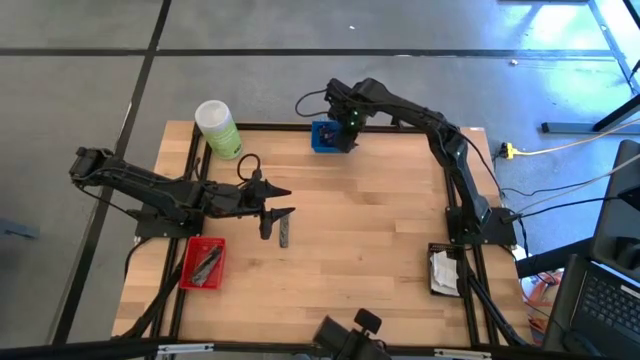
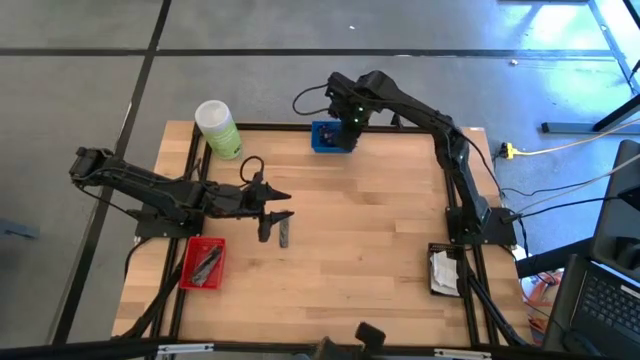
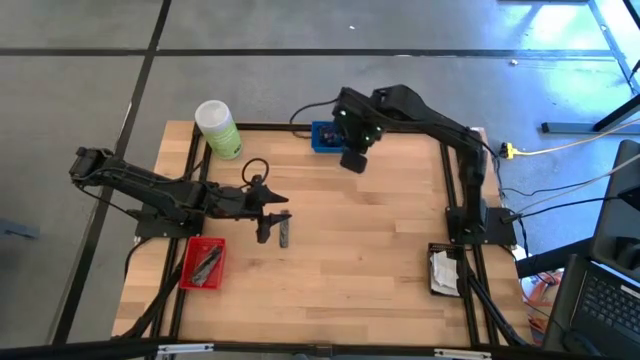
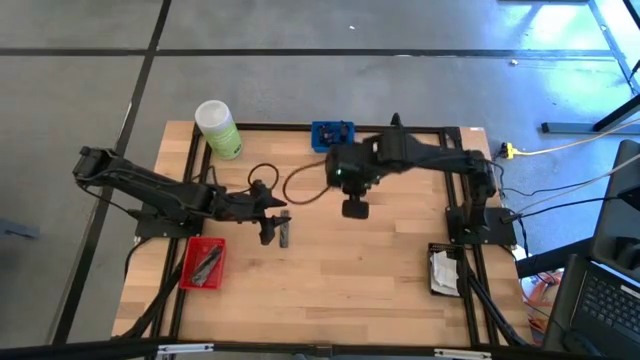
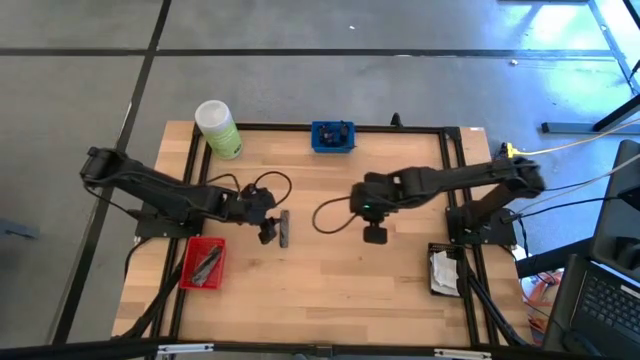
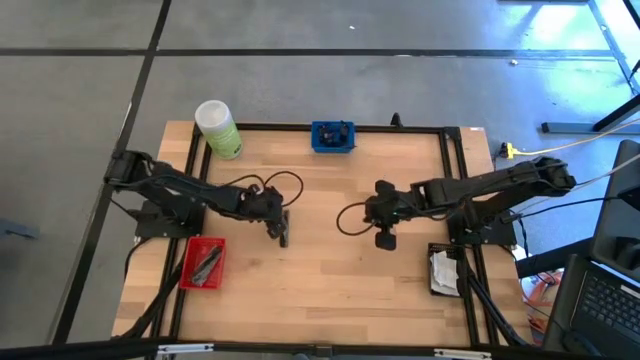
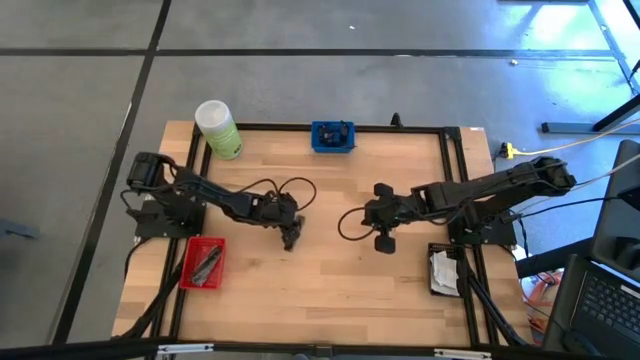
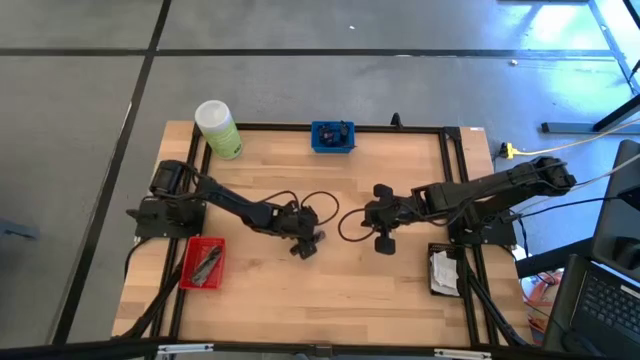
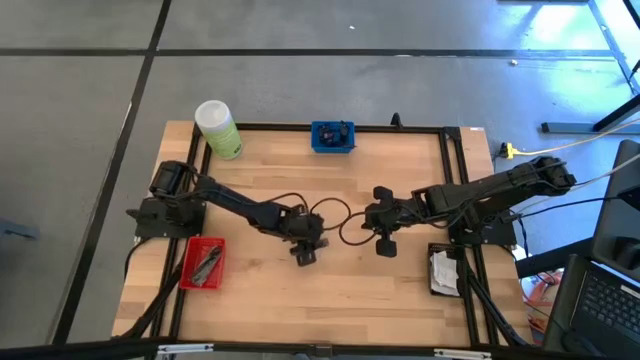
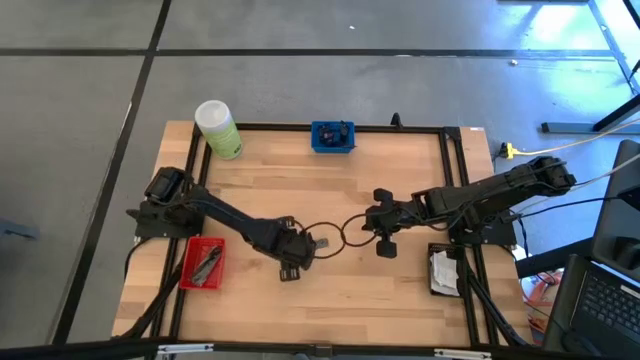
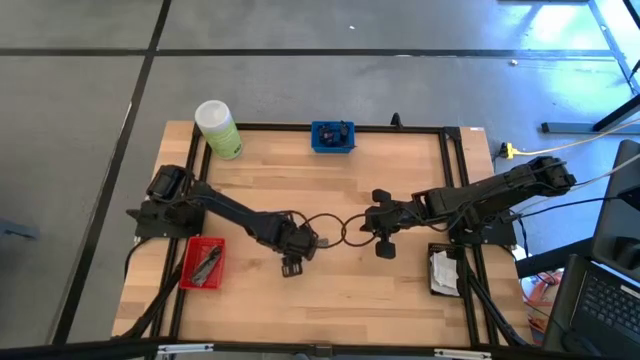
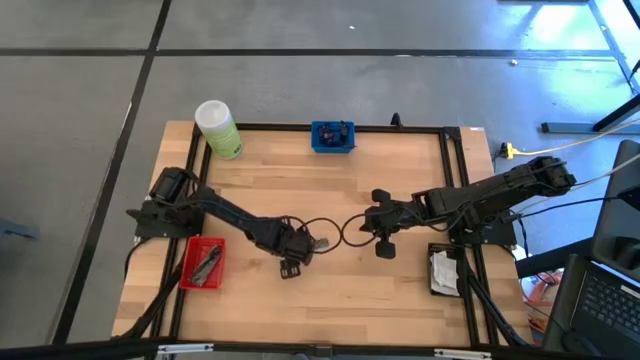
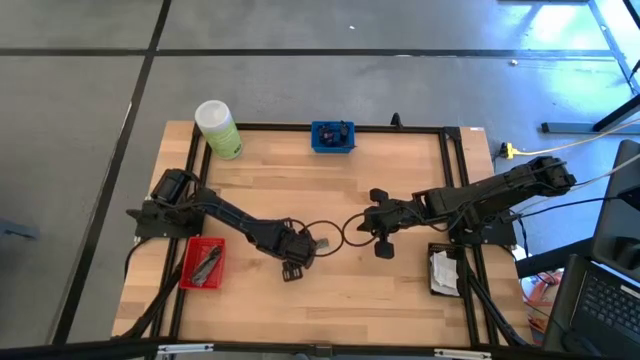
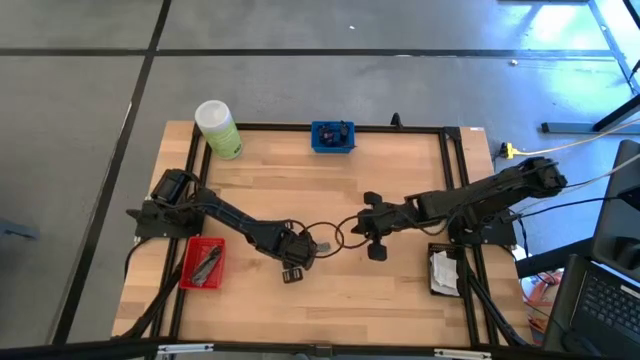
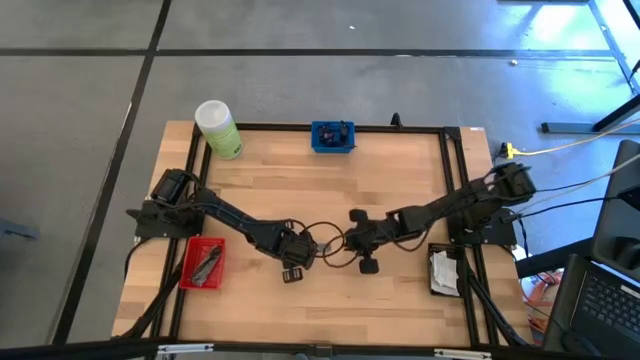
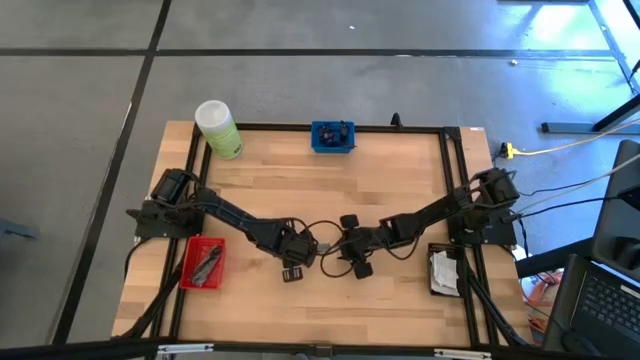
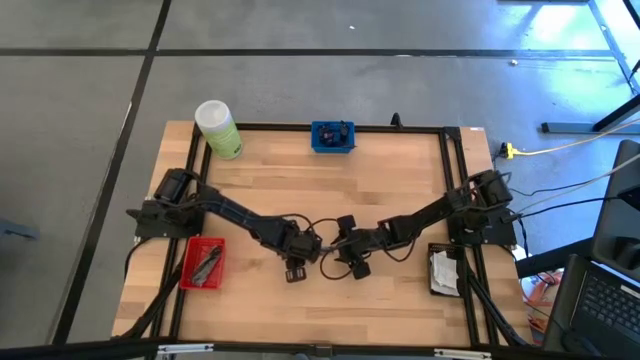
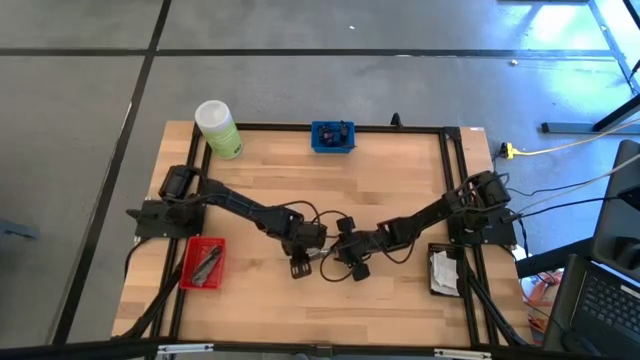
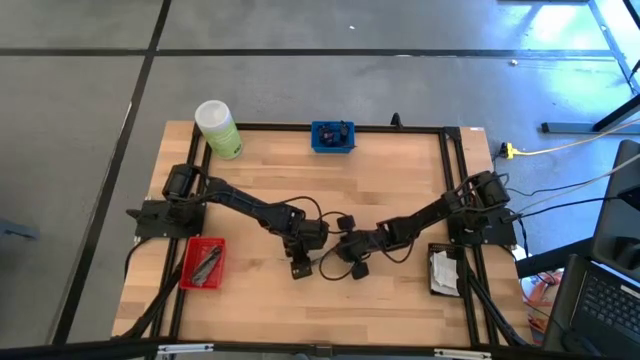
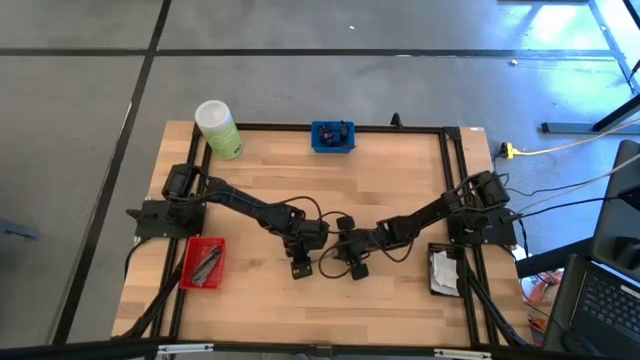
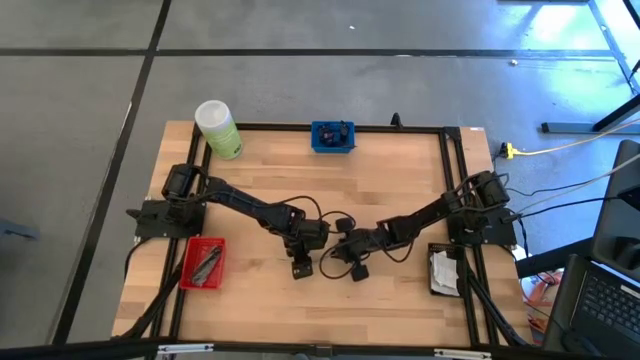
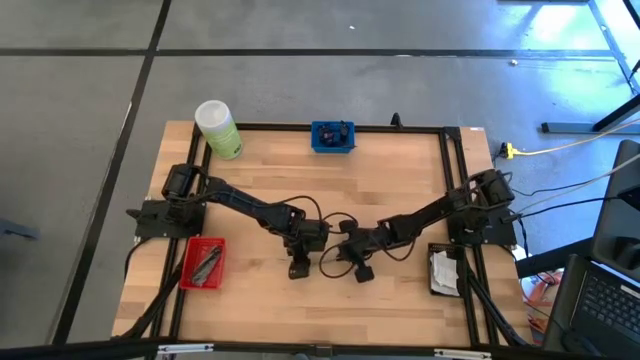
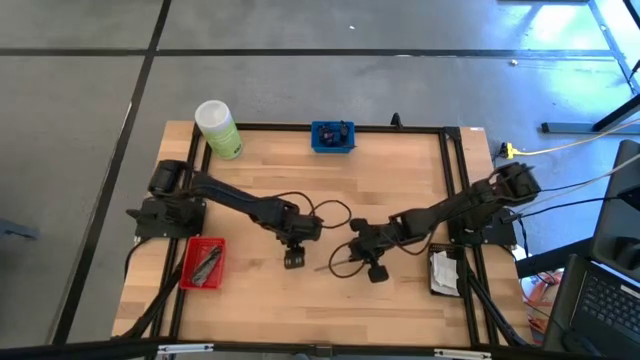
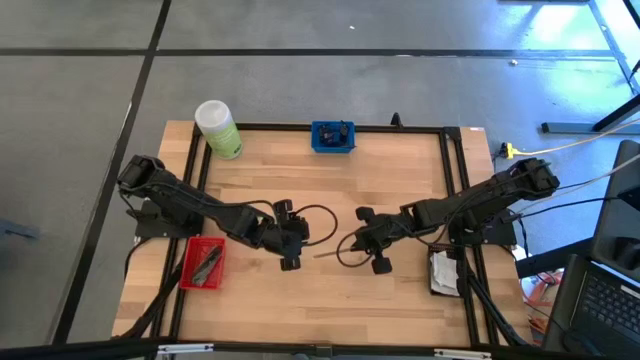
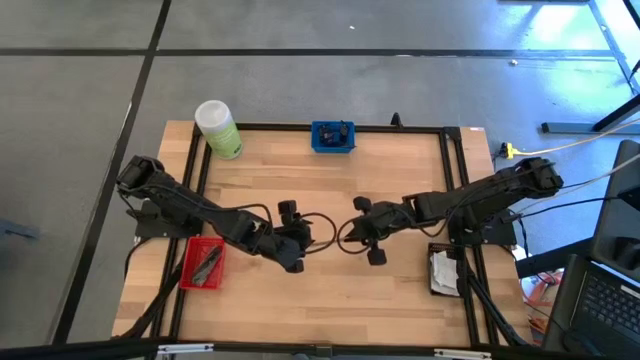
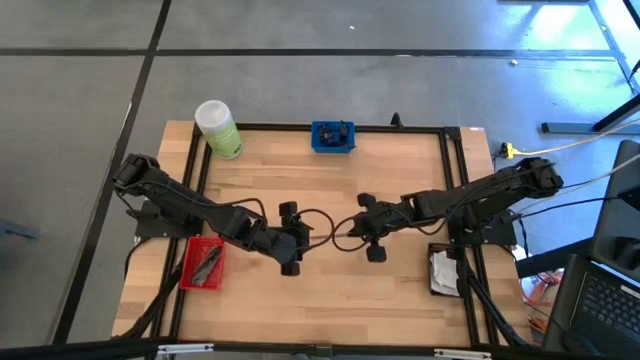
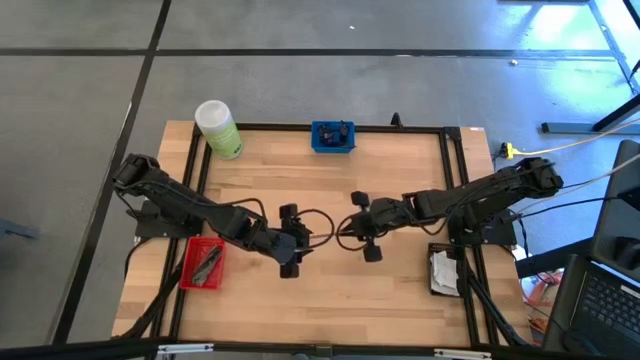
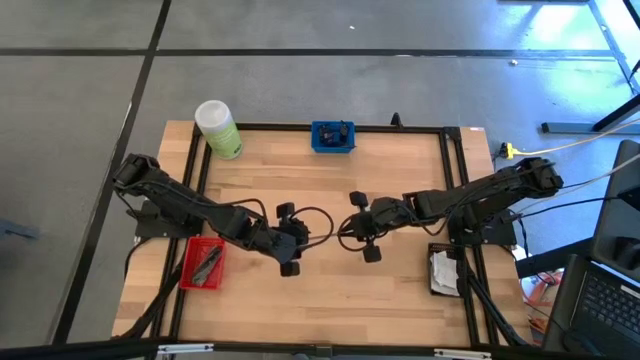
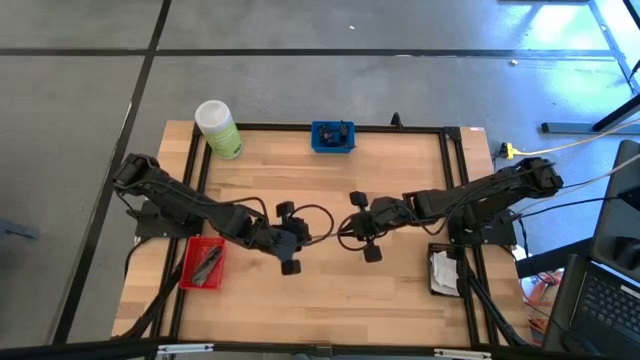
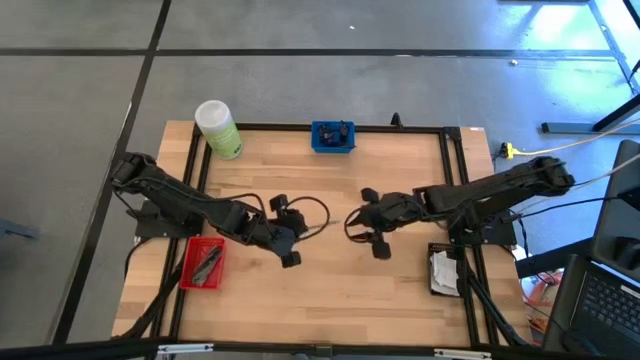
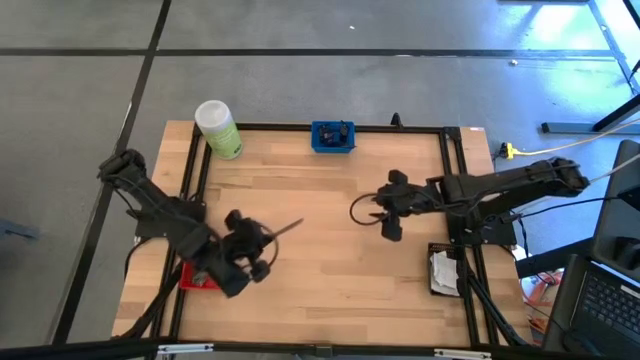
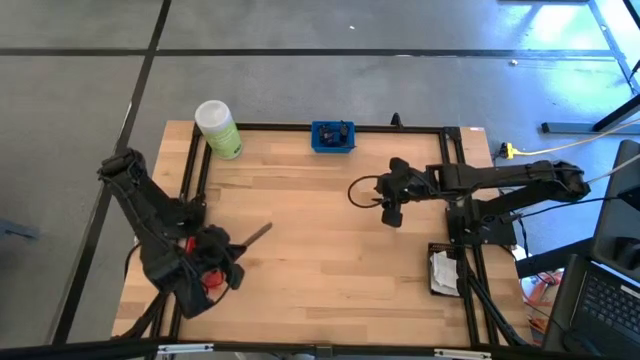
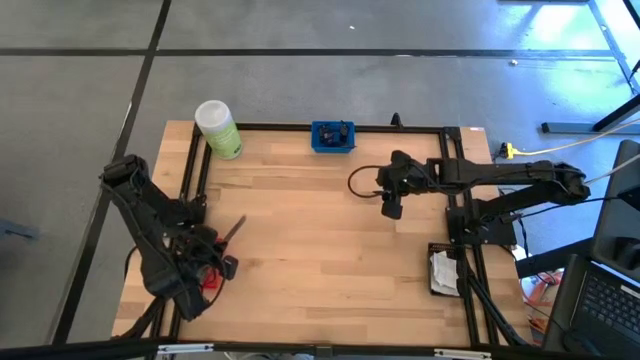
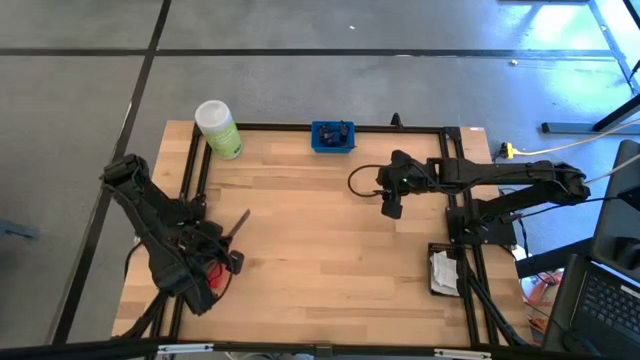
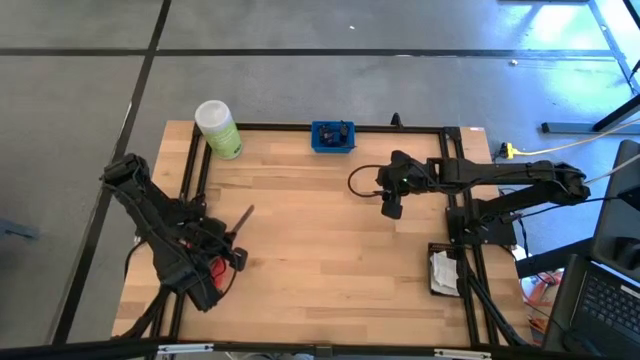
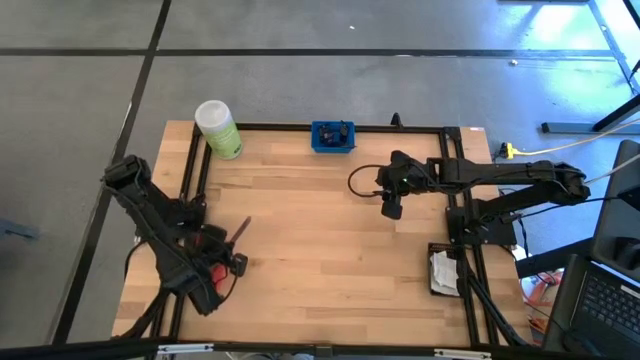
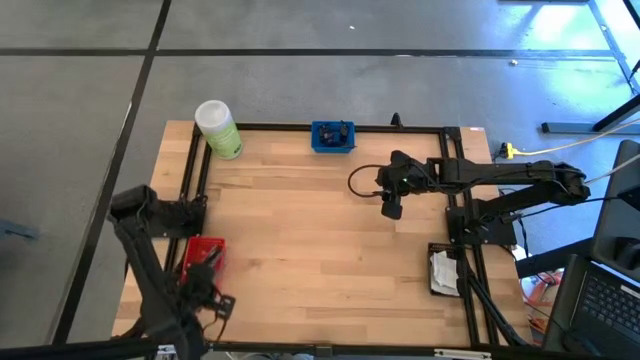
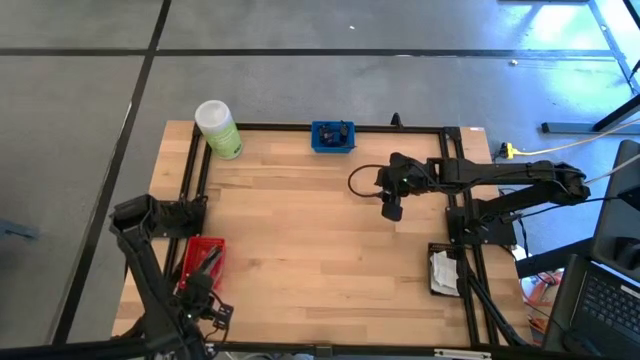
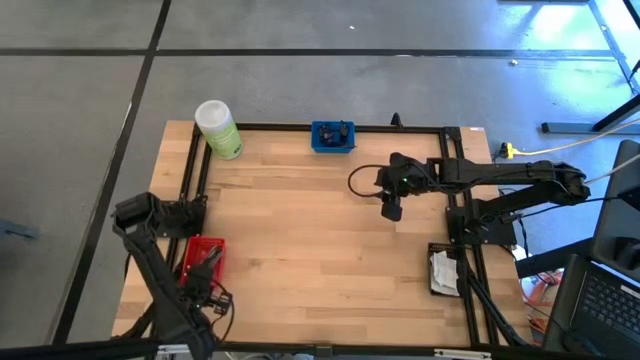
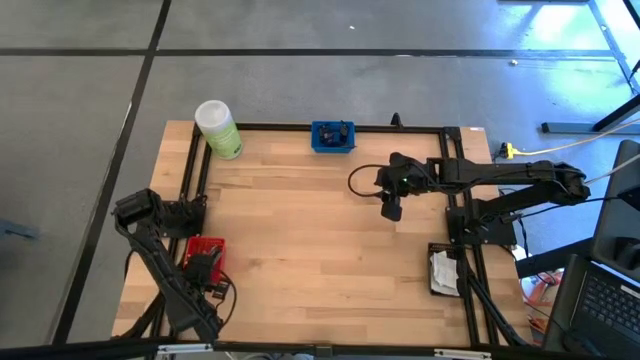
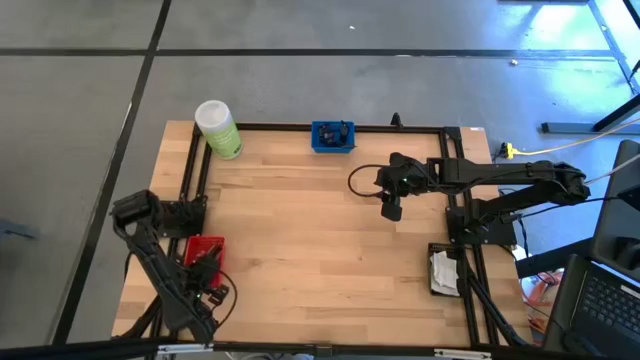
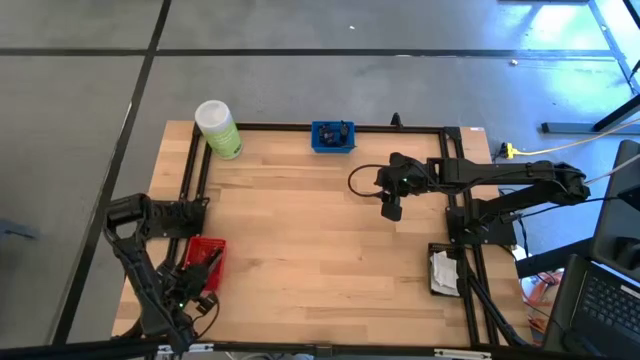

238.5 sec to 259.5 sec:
Task: Pick & Place Travel size toiletries
Put the black hair comb into the red basket
